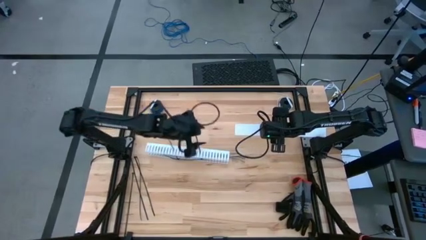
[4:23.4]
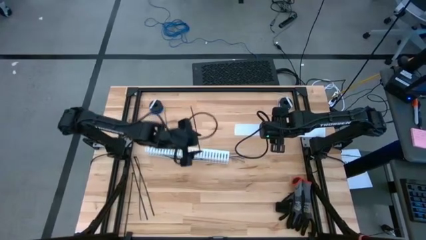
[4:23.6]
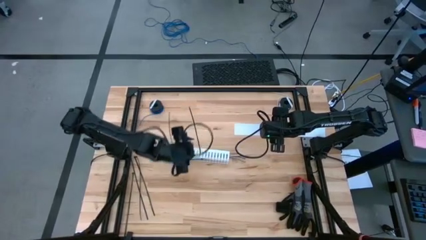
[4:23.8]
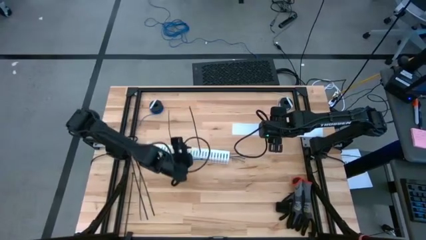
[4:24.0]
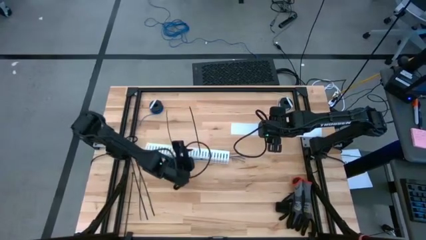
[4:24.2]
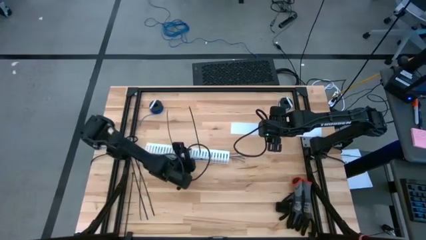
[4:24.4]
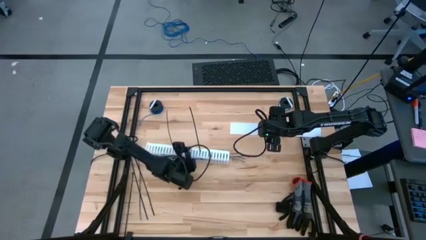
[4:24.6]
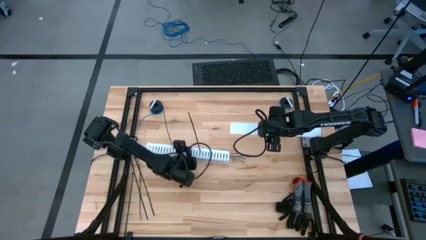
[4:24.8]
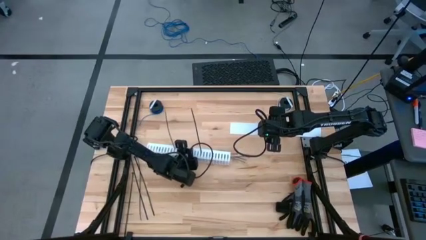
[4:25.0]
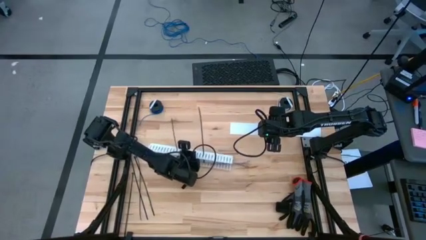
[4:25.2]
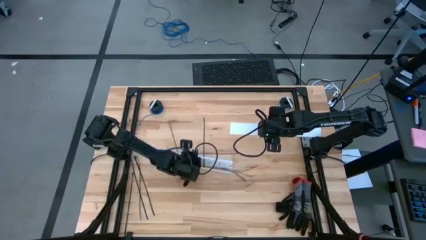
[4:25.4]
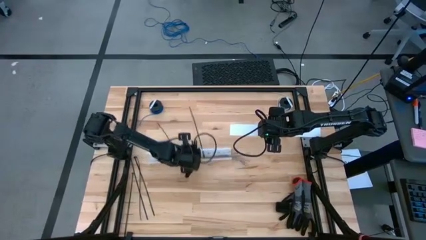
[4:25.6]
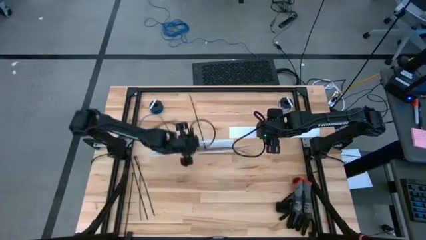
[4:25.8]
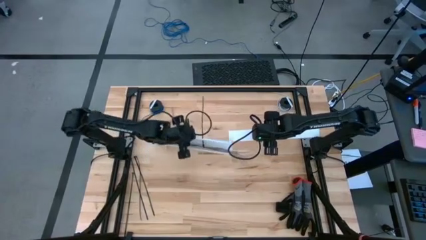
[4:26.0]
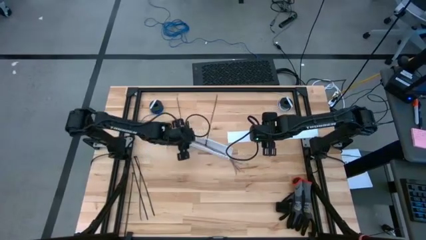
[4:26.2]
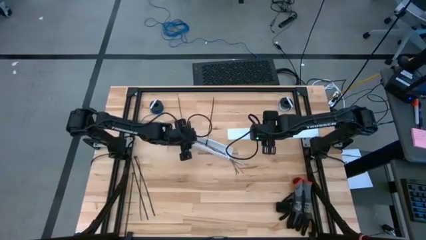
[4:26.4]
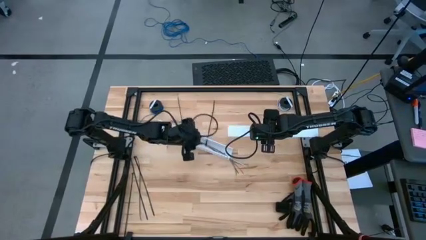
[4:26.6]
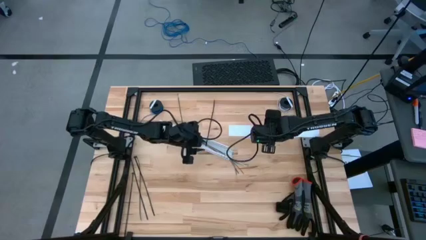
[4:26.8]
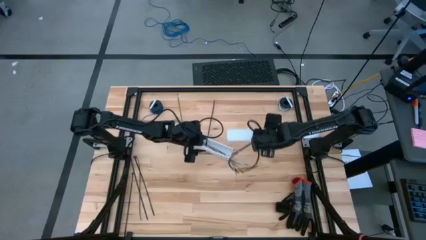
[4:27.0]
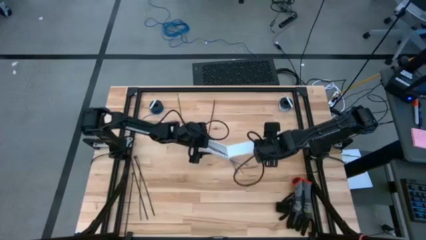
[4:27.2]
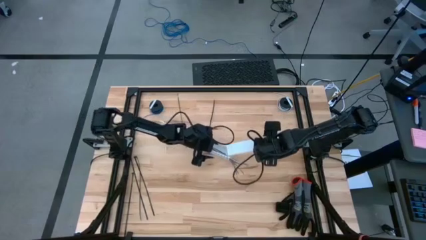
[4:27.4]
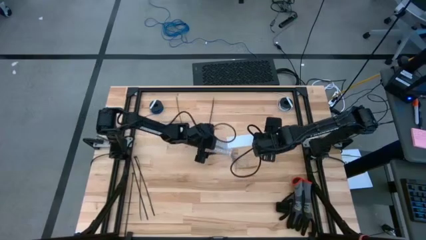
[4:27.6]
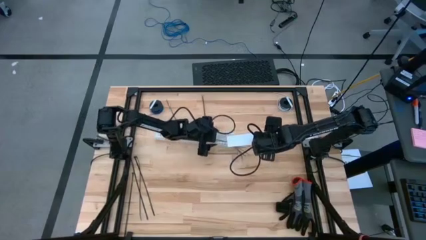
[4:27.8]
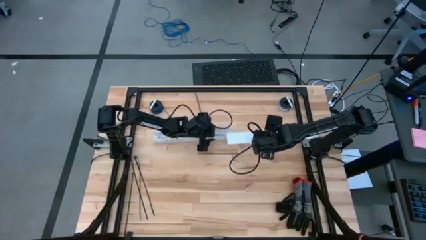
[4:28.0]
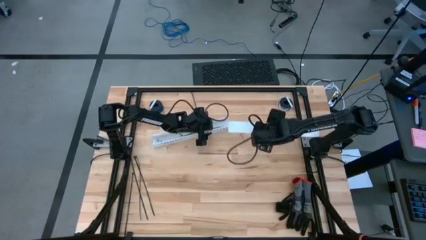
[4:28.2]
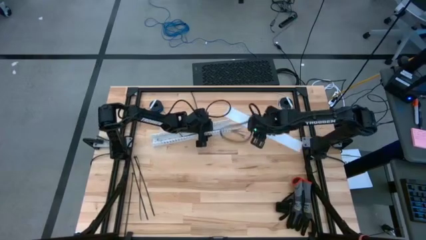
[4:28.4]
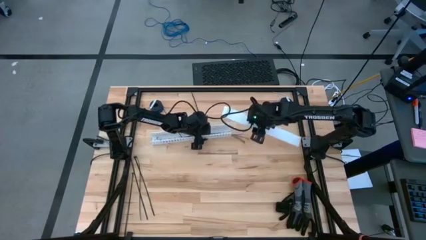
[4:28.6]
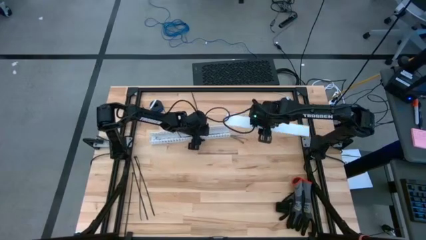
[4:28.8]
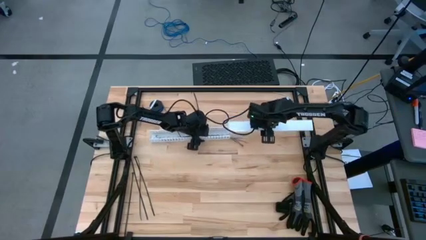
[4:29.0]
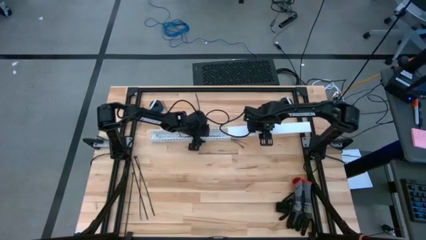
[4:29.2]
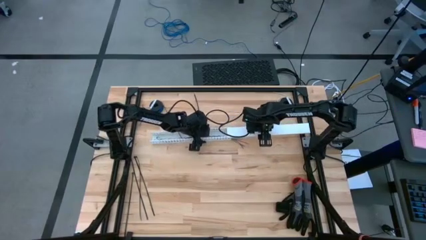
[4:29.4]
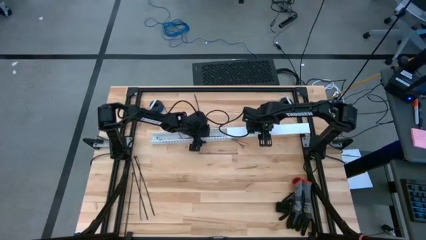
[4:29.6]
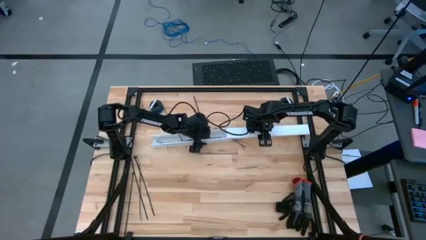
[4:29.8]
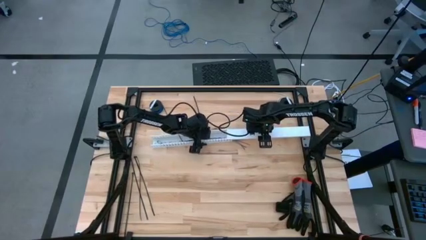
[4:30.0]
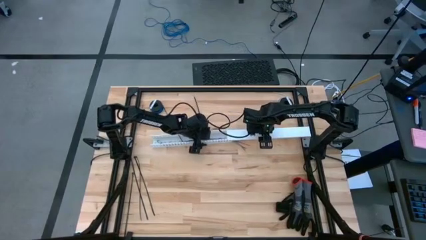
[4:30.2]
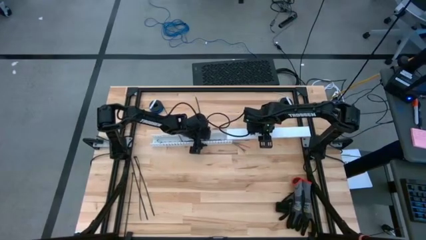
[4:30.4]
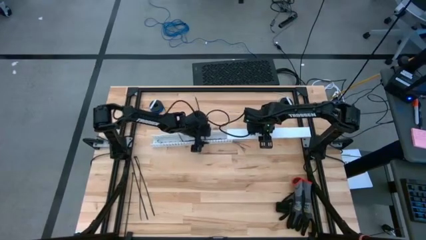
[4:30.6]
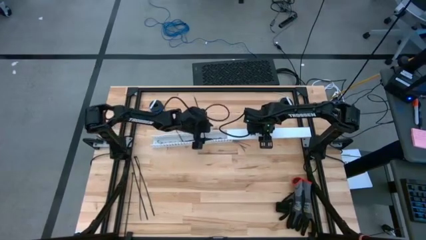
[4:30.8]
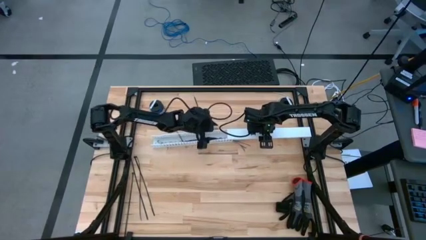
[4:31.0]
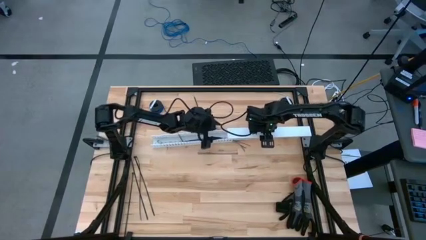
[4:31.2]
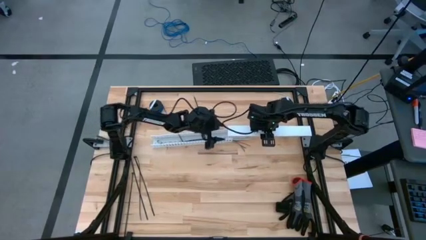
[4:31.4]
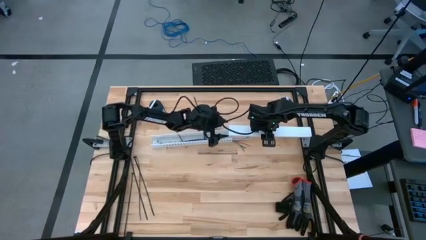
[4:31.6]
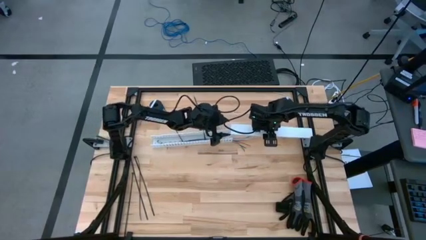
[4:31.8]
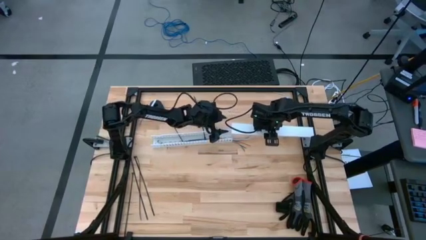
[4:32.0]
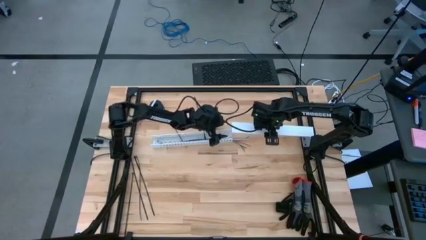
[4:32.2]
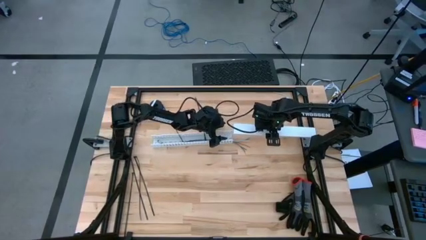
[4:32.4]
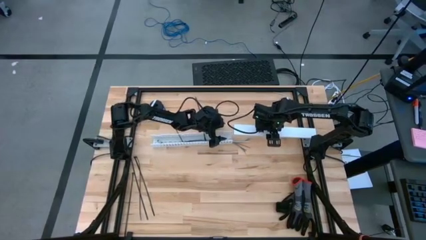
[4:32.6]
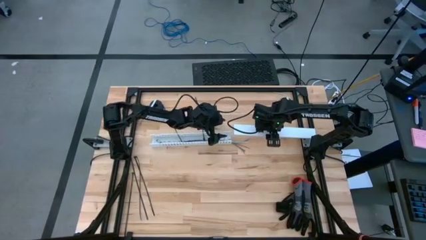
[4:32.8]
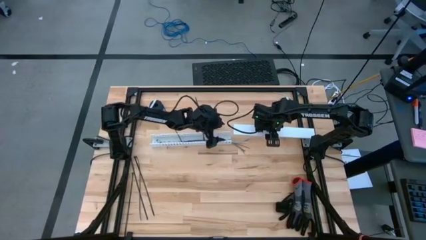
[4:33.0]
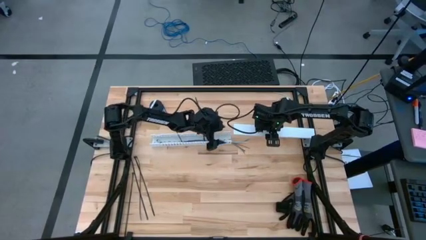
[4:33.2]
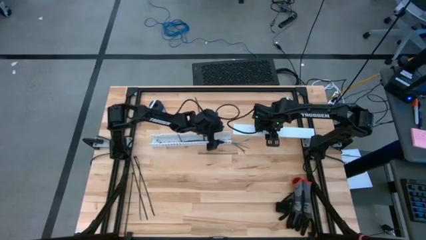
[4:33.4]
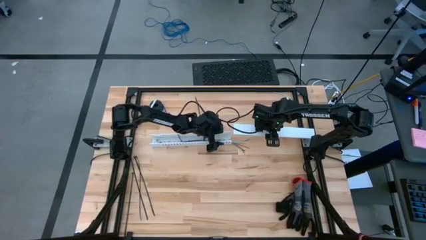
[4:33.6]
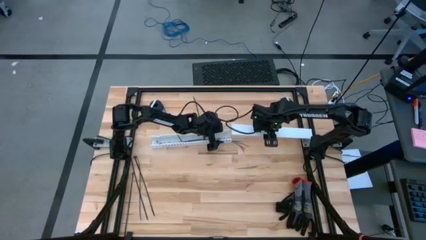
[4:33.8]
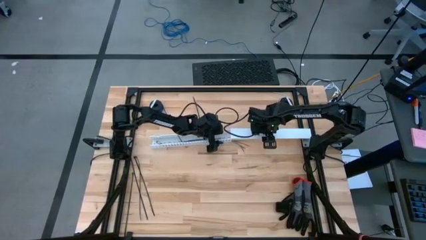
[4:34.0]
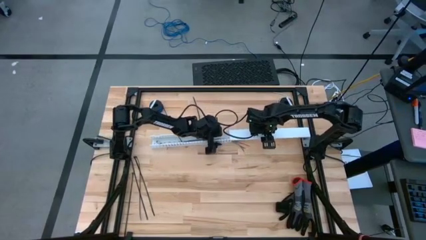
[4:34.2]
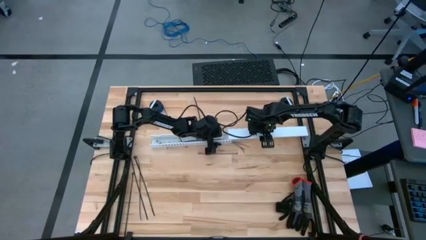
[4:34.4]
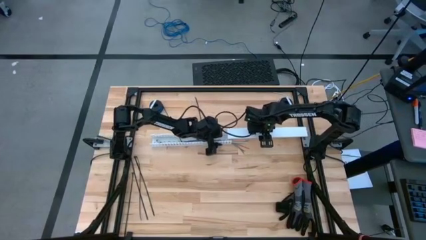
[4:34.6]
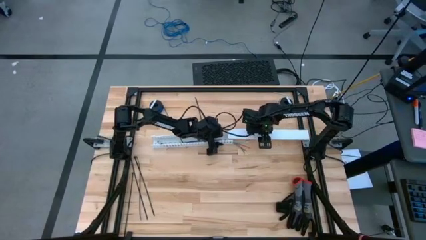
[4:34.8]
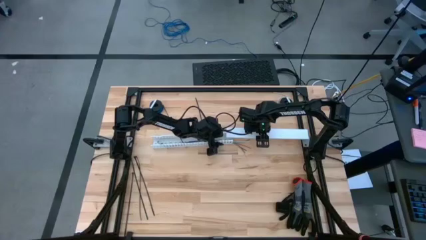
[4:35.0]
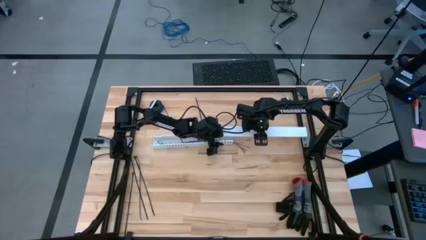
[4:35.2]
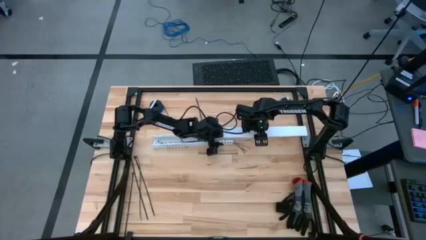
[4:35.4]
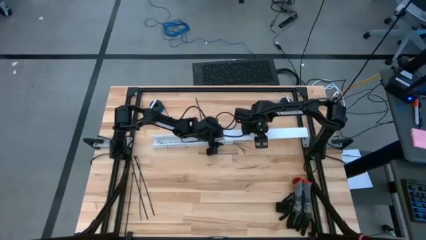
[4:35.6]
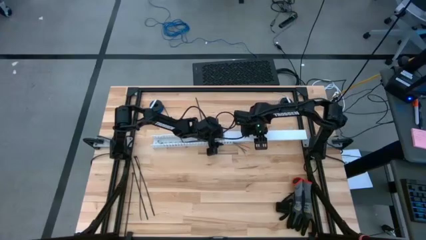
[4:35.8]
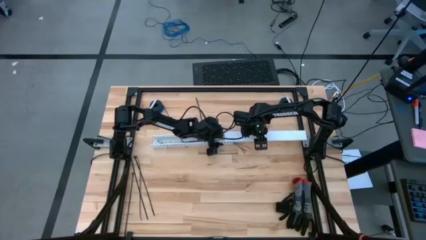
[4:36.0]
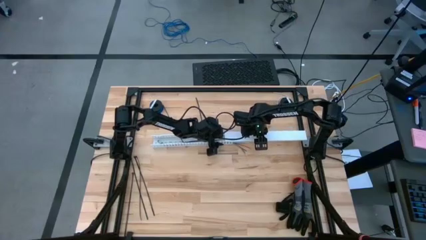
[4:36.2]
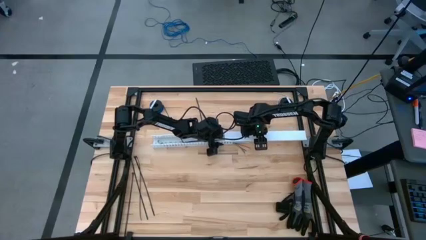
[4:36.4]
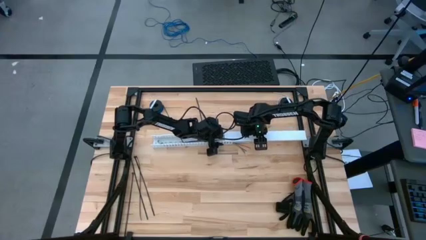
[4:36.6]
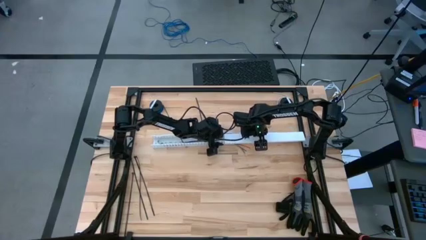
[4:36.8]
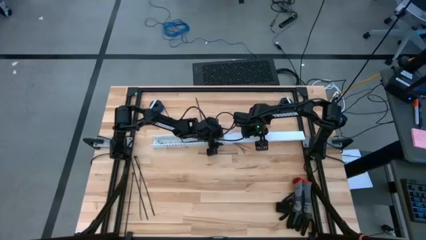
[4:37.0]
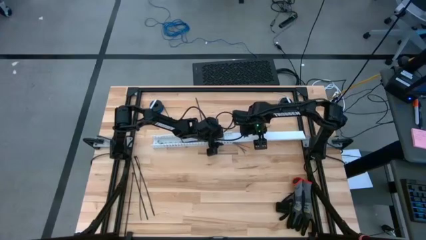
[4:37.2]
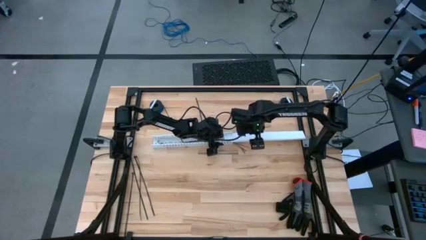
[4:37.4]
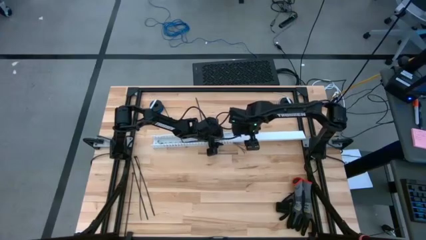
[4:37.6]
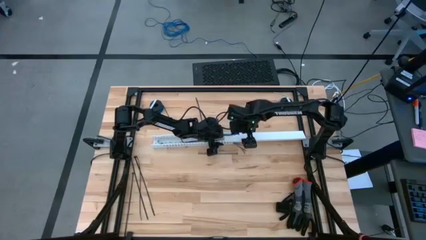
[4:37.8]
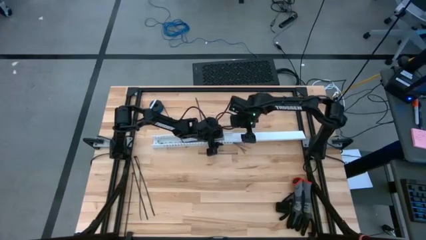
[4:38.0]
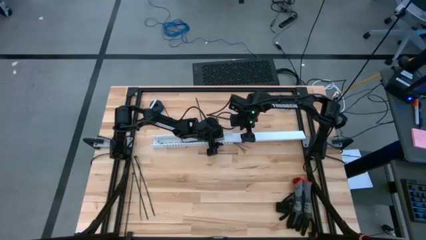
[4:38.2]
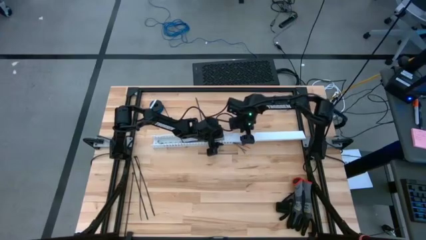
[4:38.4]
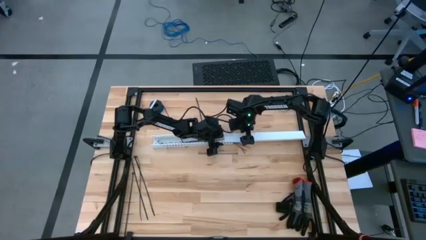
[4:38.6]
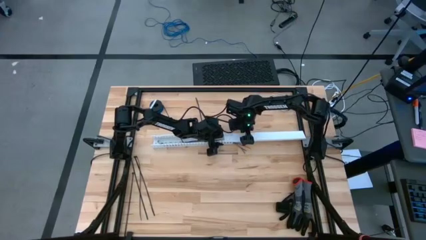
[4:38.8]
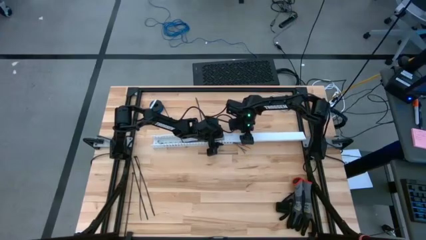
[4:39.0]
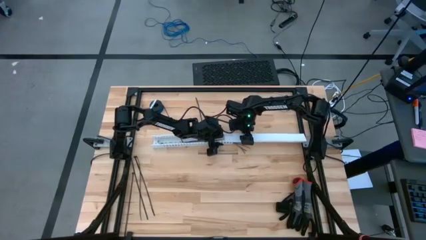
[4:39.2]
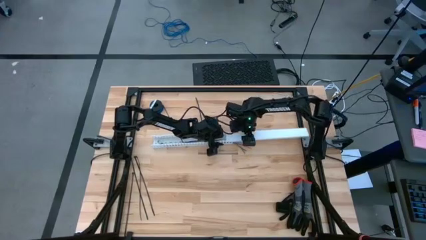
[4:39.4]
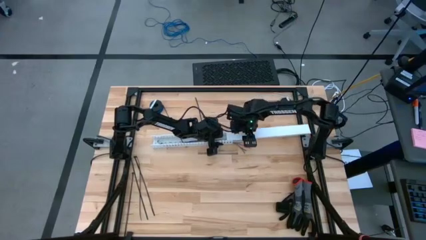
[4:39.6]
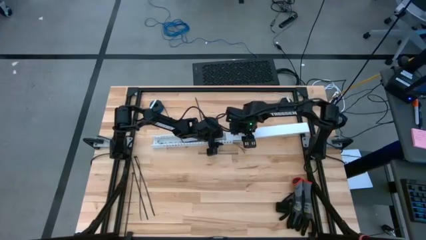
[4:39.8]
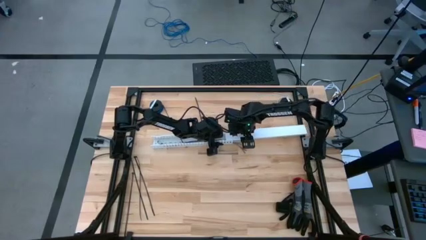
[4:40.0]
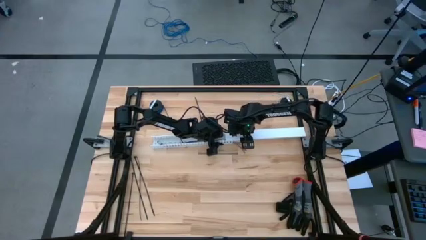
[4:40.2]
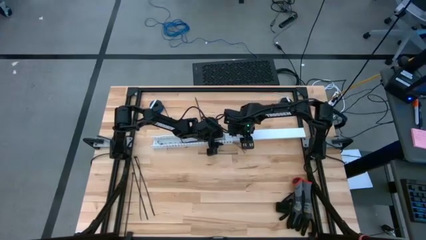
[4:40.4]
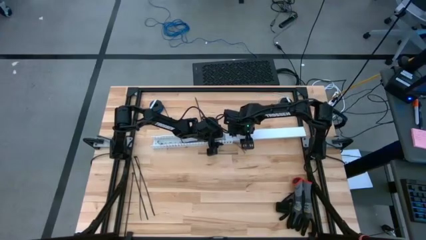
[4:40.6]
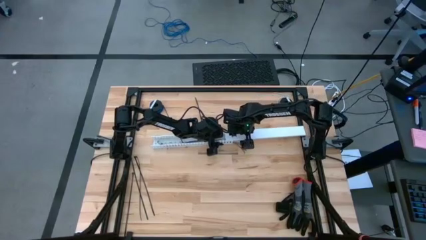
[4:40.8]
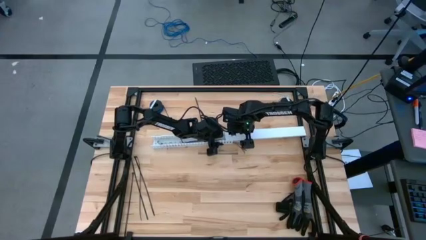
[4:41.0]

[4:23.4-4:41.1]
Task: Ziptie cables
Close the white cable duct
